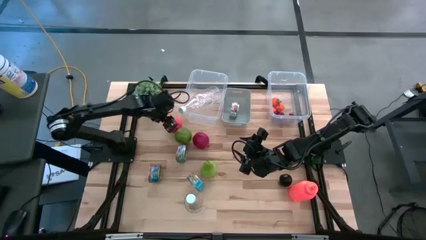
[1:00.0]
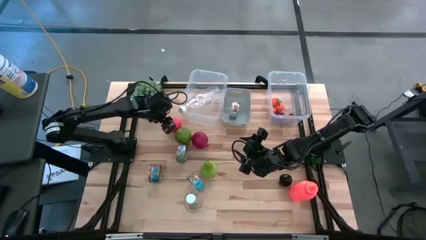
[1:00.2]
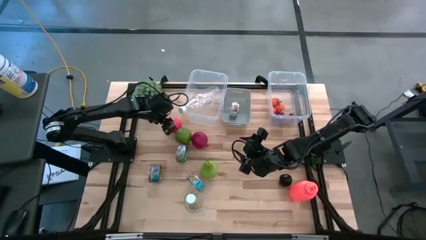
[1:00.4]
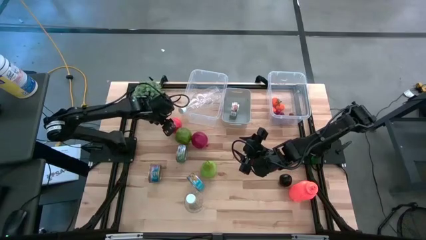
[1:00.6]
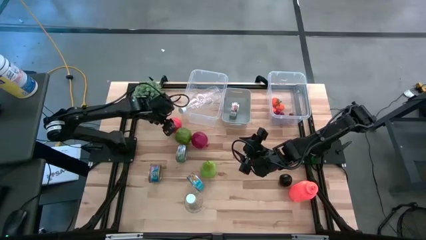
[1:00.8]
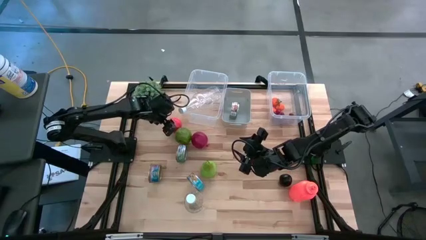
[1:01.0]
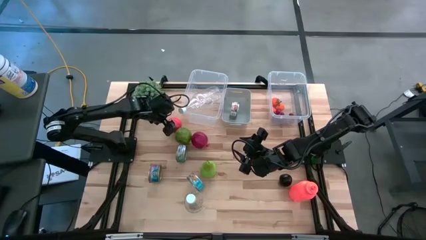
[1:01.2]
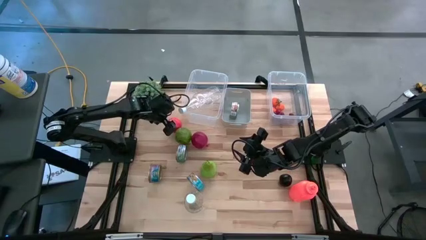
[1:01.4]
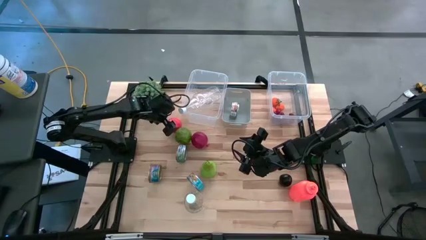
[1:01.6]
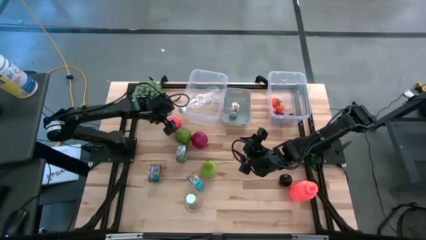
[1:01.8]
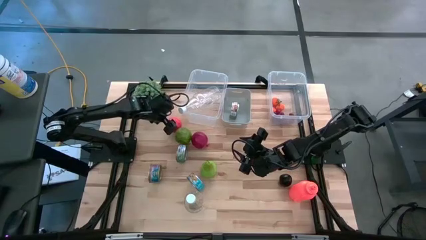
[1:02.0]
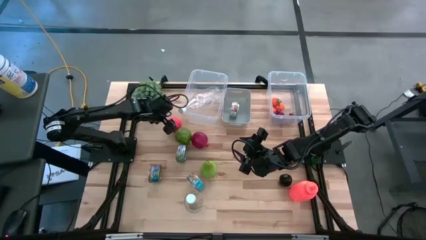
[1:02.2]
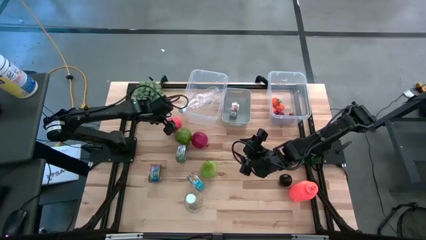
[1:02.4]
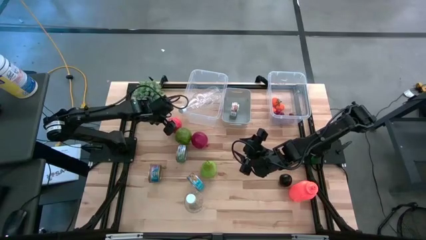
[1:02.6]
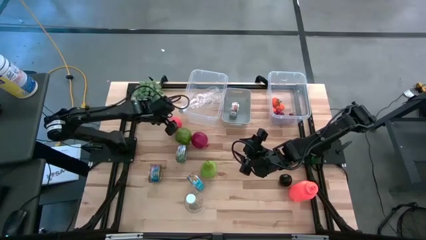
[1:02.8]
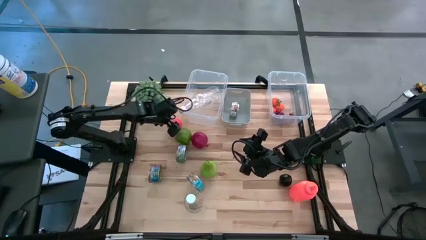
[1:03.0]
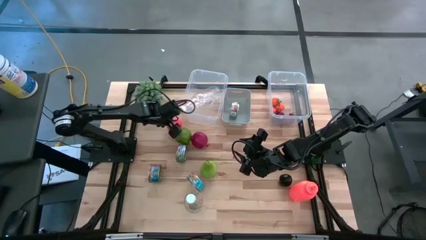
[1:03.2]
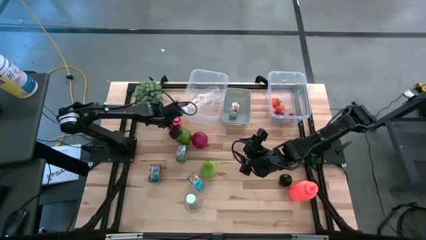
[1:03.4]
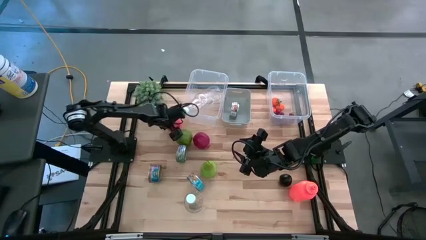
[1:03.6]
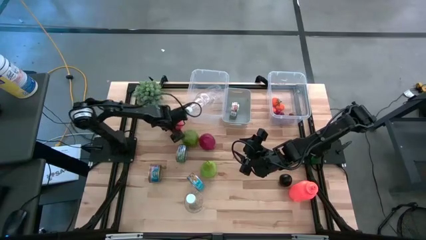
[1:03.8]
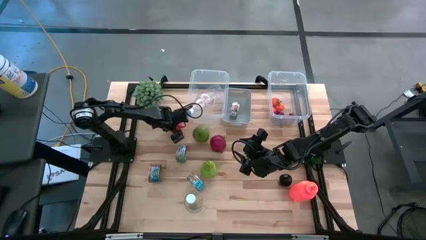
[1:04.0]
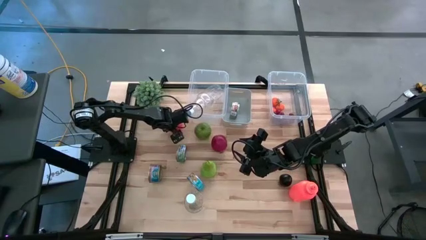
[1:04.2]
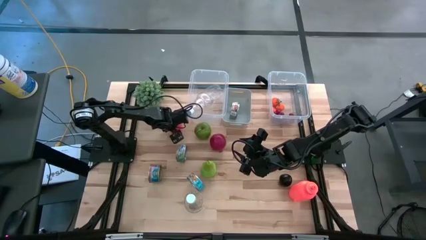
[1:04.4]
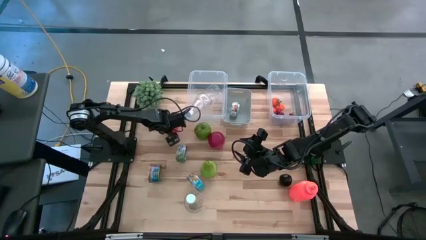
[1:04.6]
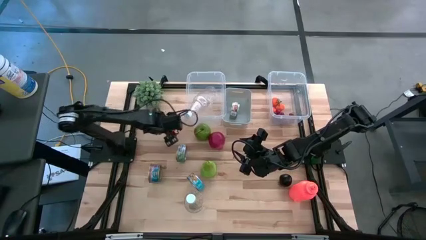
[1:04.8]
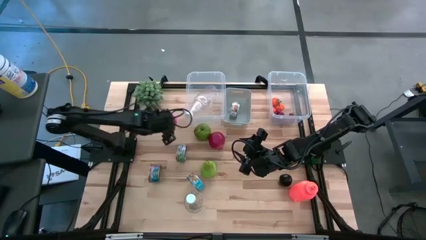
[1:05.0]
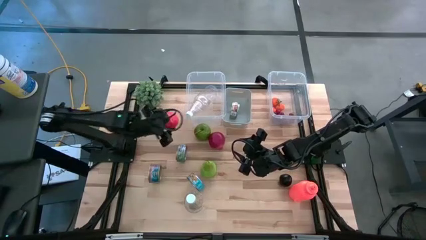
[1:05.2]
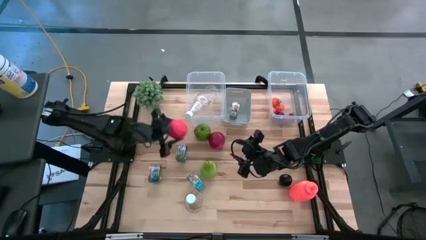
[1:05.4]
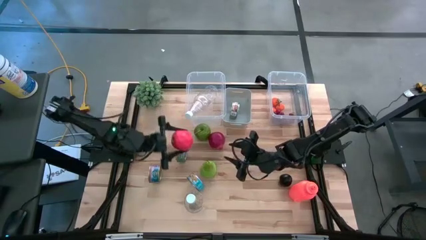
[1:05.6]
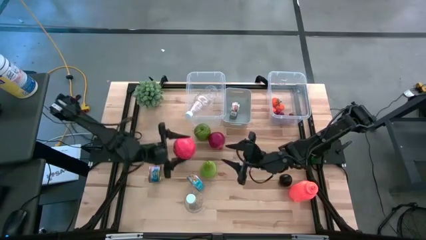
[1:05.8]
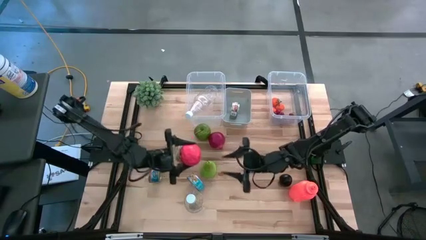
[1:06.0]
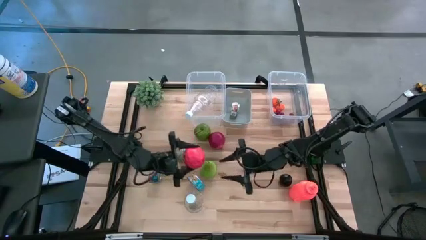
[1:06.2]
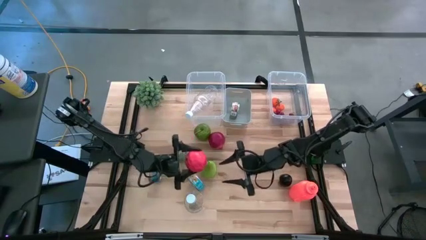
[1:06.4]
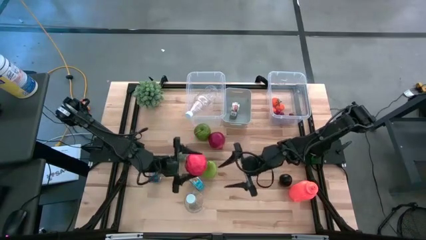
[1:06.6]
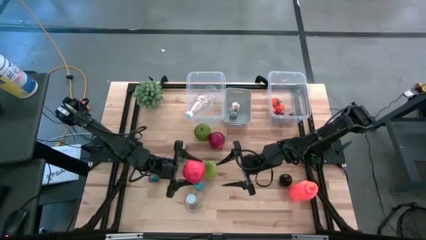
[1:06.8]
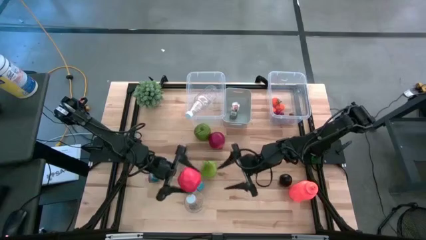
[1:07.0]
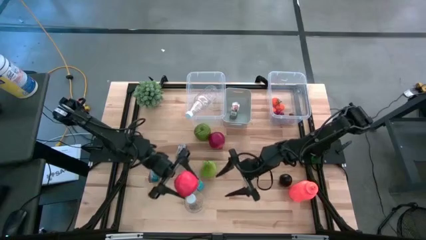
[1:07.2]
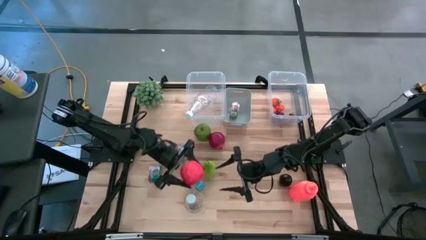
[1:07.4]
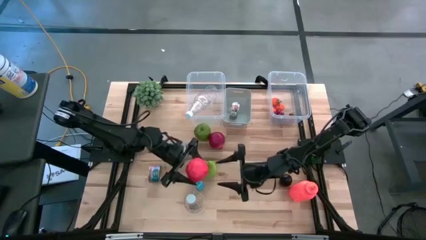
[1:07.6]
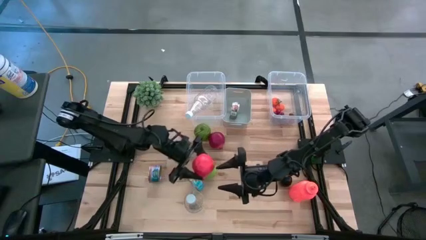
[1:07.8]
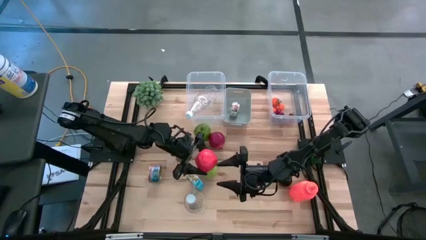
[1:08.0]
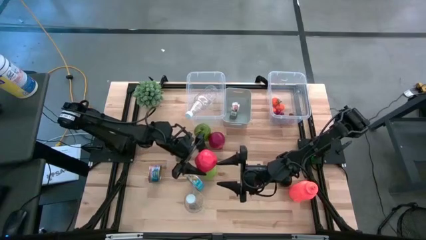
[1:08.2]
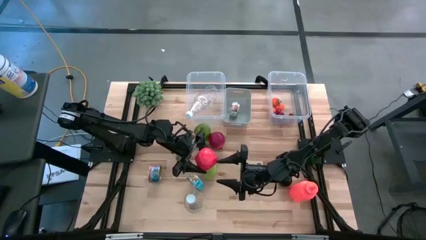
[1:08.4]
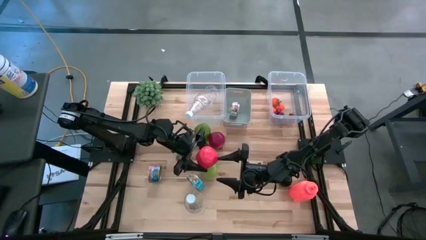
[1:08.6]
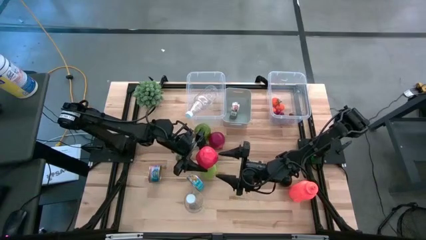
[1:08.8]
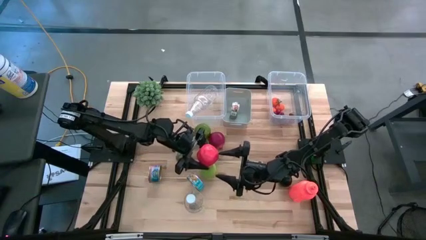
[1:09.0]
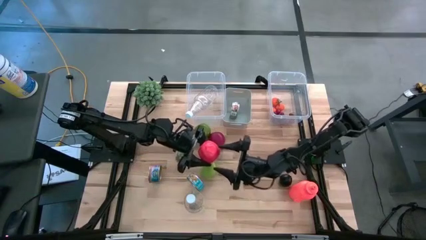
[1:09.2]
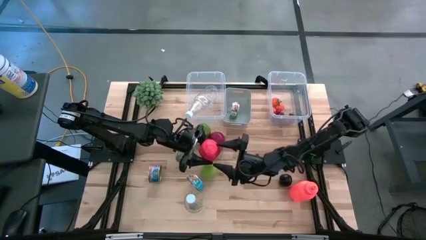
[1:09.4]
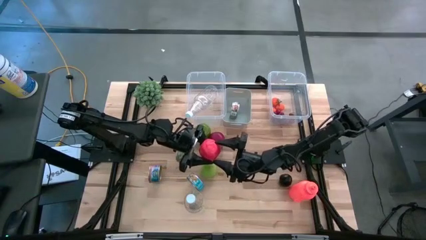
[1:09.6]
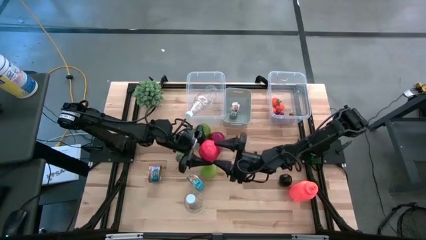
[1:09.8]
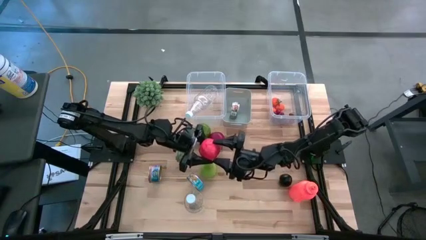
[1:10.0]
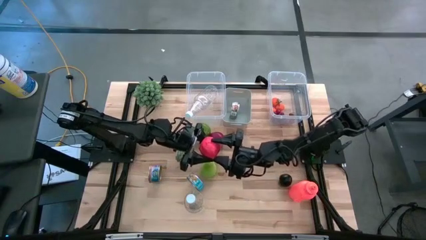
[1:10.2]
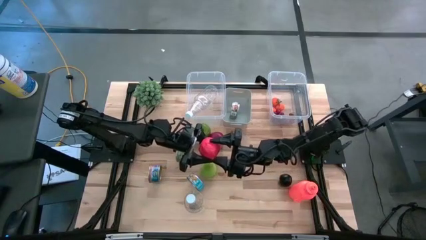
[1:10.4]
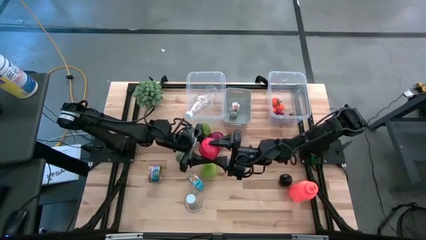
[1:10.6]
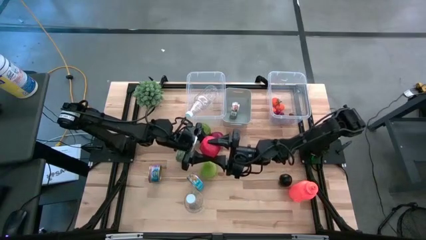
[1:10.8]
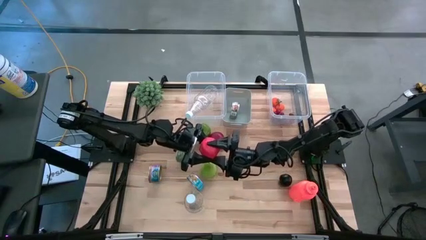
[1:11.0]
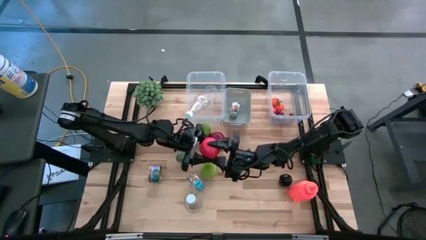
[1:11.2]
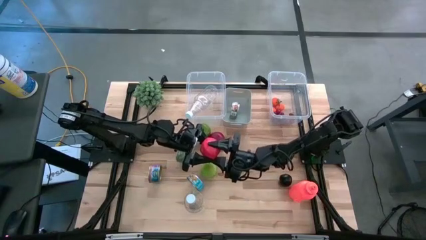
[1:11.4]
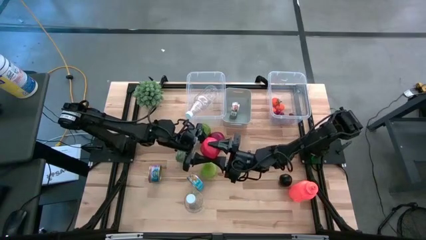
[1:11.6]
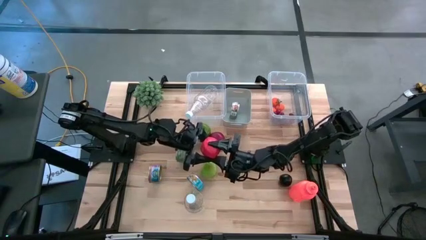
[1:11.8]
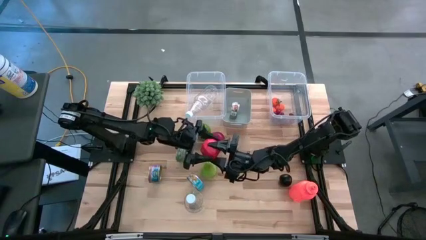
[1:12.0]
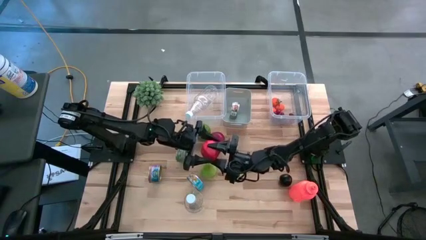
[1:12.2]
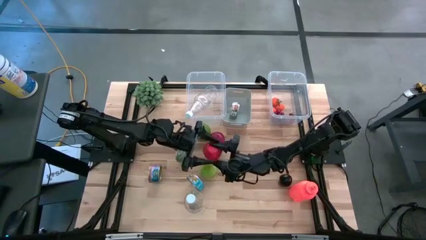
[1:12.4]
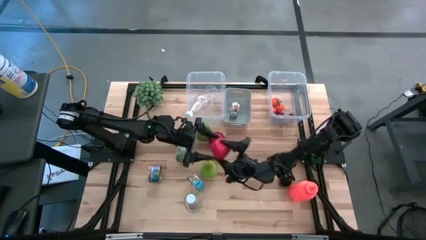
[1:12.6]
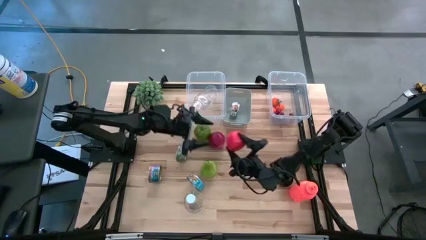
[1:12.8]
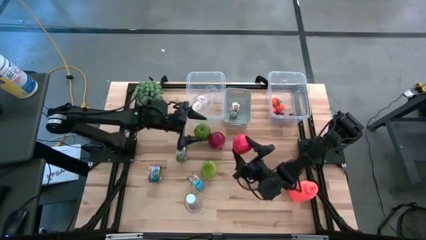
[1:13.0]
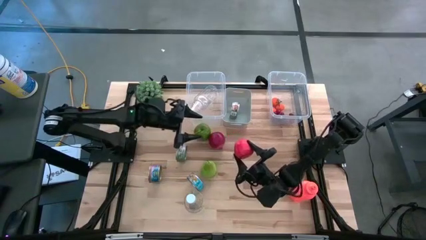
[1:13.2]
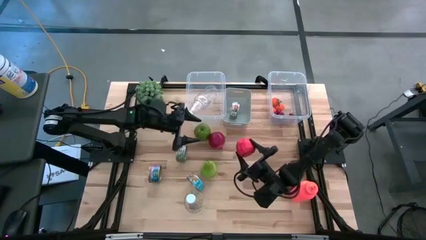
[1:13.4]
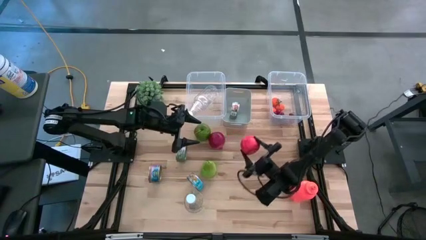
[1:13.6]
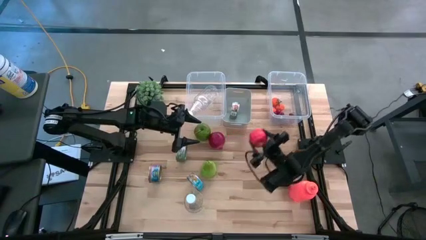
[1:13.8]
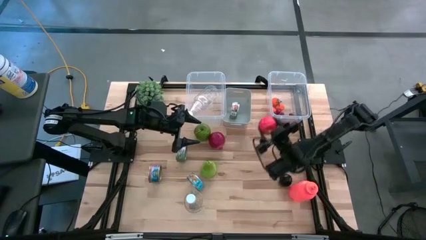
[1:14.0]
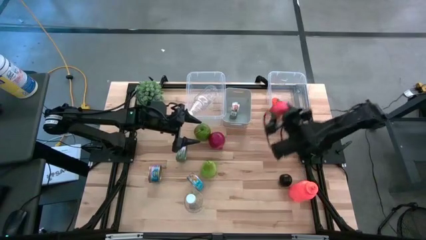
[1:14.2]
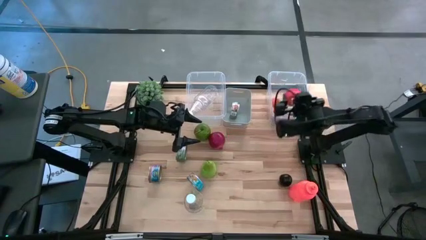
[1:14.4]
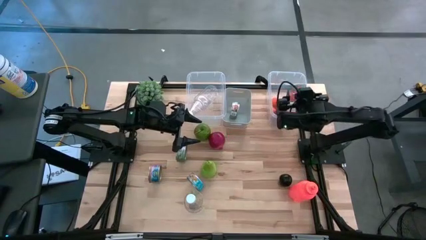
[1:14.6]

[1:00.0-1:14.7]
Task: Pick & Place Food Item
Put the red apple into the right transparent bin
